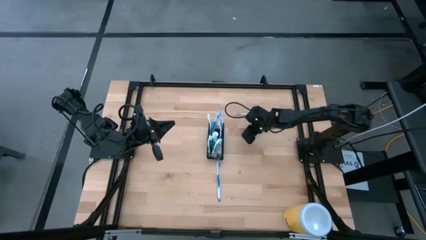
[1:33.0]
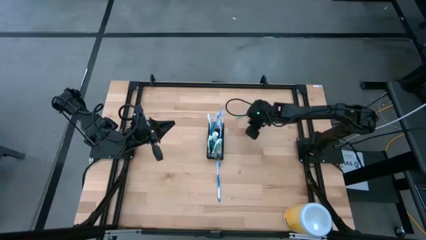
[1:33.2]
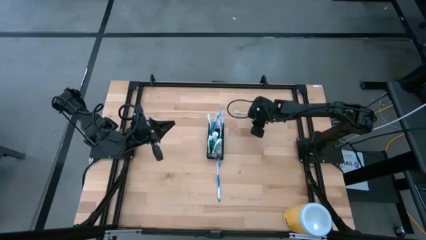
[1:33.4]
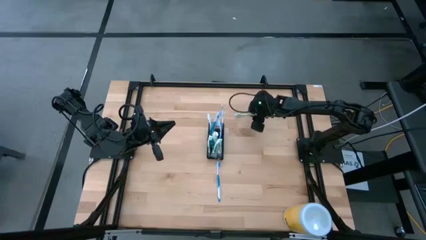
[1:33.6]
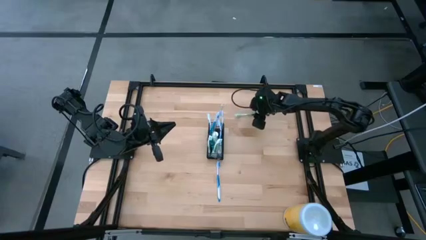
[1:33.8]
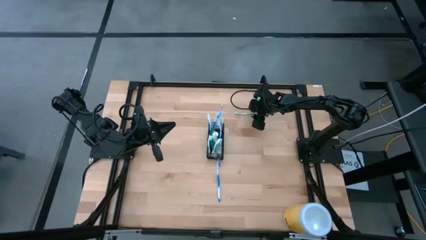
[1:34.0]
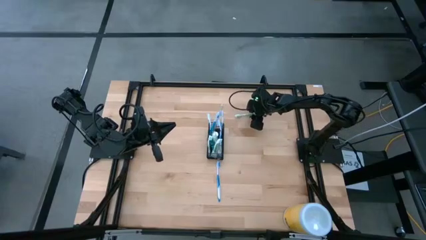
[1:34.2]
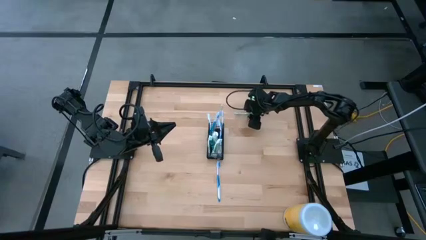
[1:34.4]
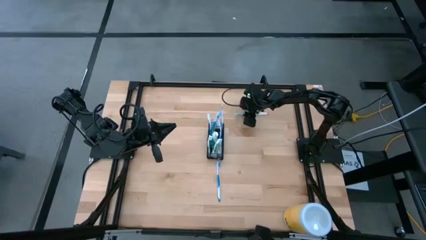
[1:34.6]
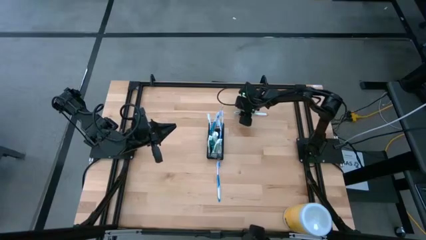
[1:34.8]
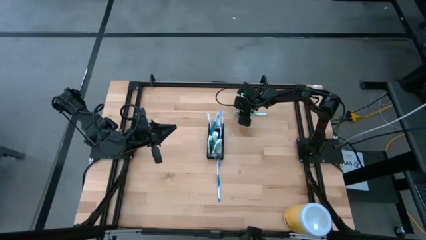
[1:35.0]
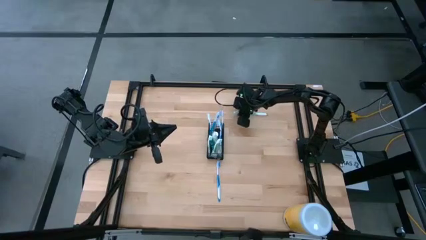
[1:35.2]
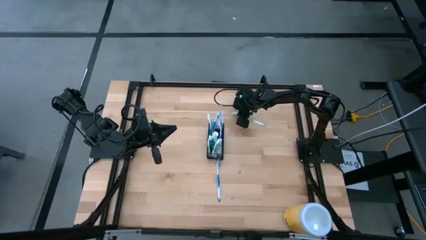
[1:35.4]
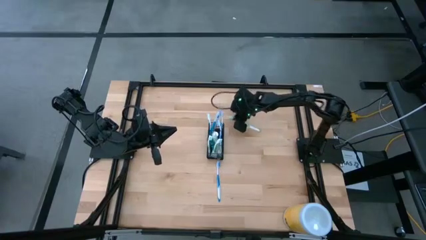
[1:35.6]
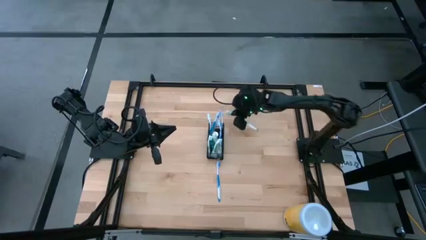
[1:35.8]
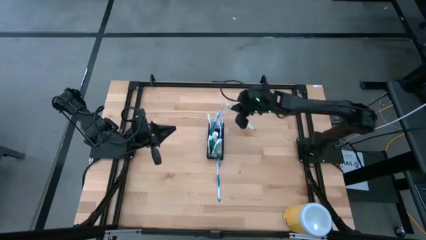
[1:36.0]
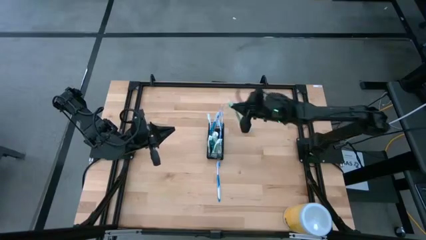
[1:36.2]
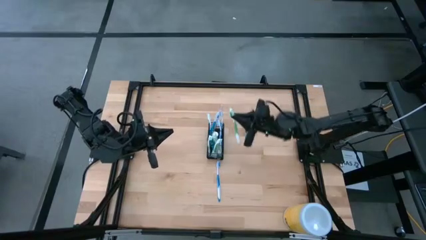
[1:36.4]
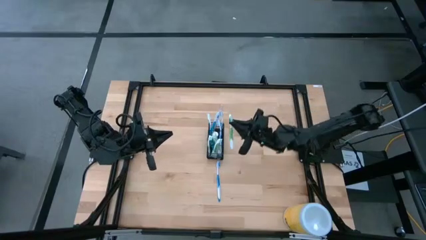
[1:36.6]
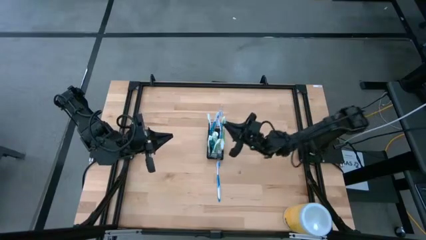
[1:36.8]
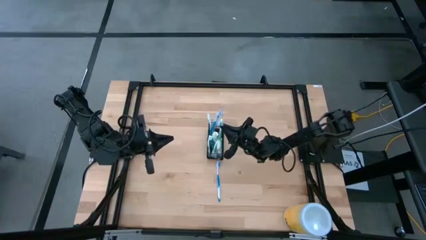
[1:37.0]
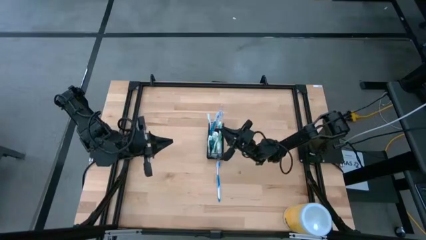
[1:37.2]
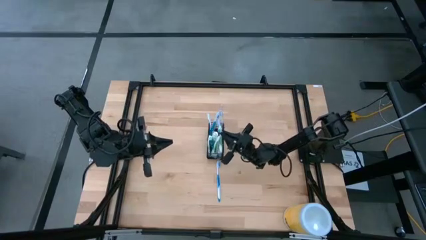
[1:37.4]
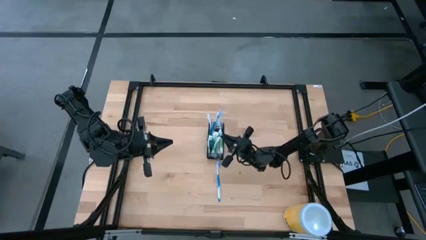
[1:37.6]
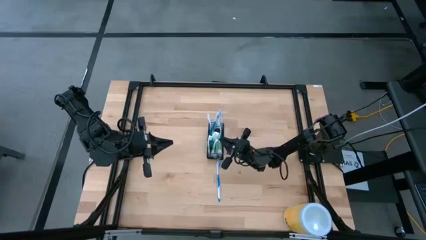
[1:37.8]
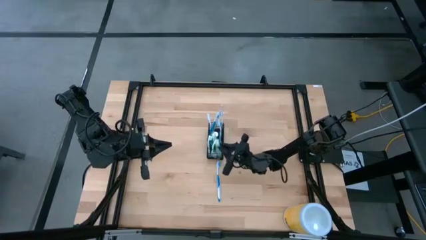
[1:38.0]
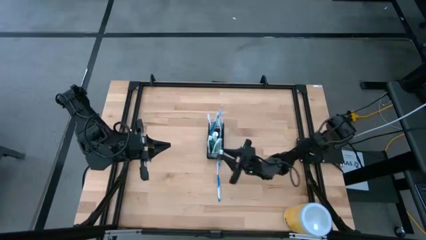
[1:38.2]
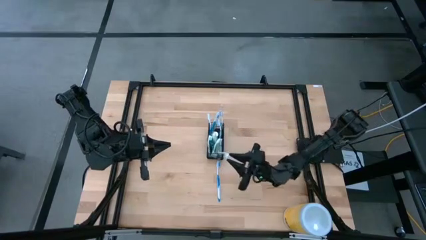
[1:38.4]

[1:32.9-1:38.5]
Task: Pick & Place toothbrushing station
Put the green toothbrush into the black organizer

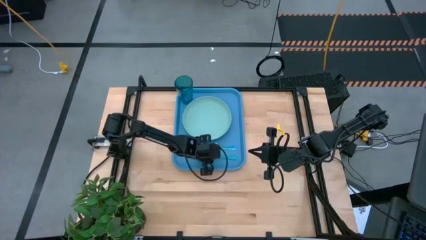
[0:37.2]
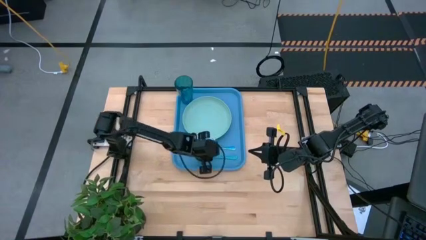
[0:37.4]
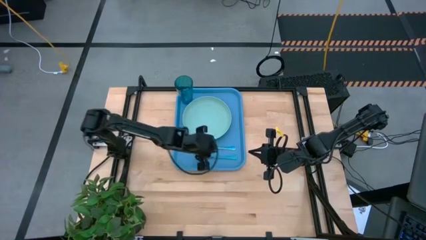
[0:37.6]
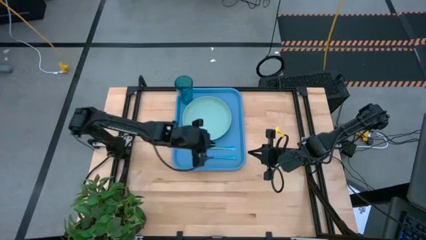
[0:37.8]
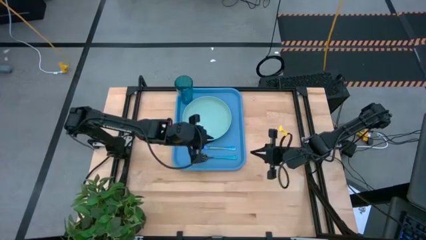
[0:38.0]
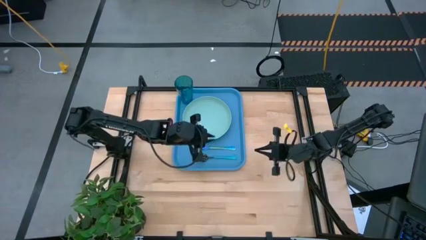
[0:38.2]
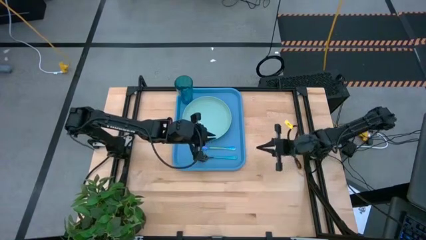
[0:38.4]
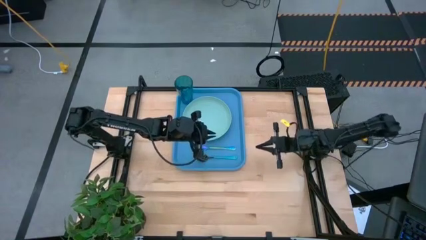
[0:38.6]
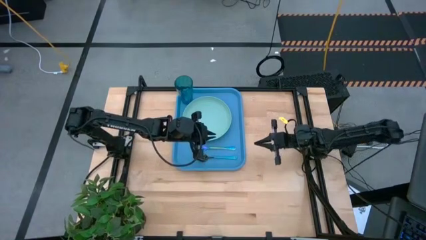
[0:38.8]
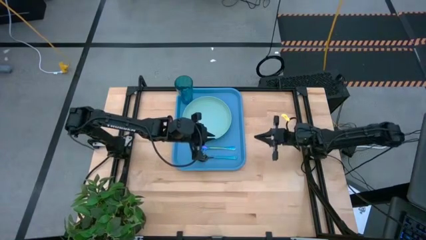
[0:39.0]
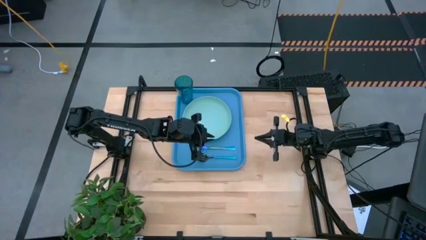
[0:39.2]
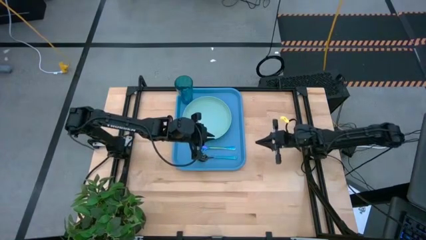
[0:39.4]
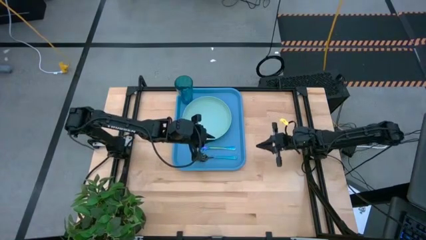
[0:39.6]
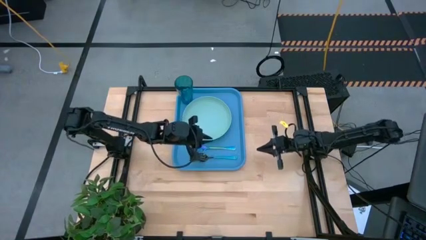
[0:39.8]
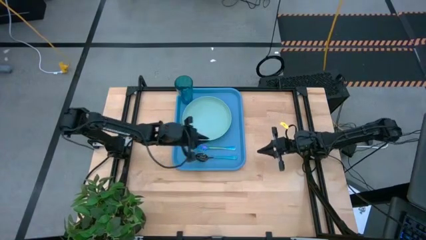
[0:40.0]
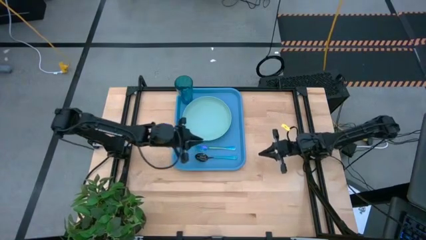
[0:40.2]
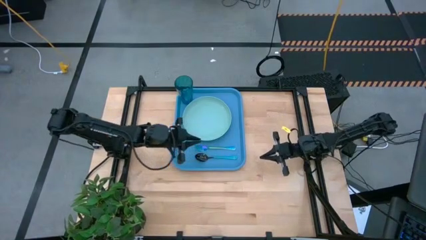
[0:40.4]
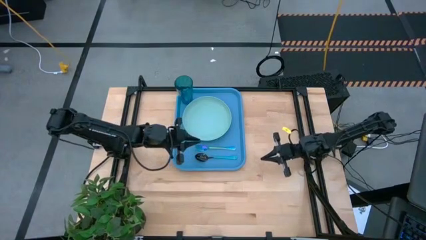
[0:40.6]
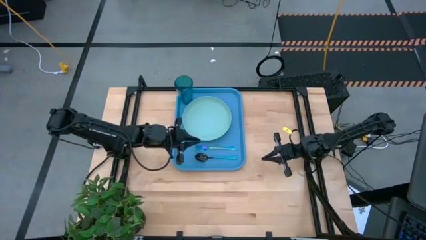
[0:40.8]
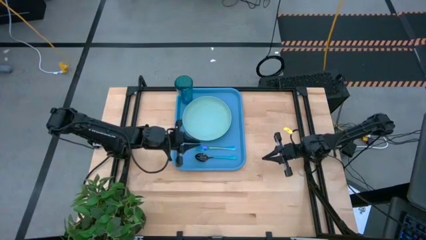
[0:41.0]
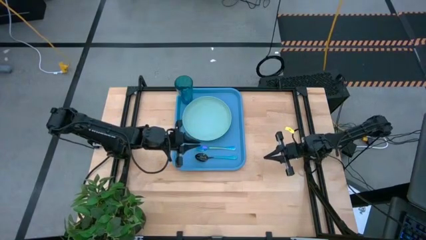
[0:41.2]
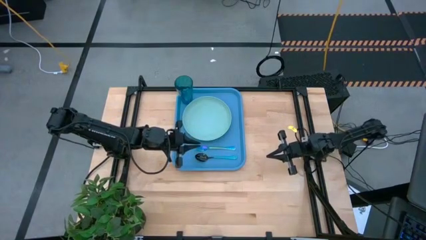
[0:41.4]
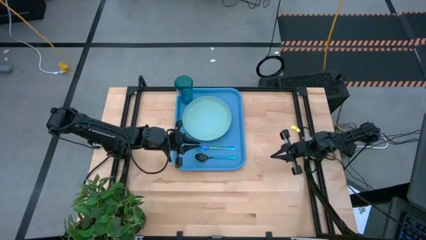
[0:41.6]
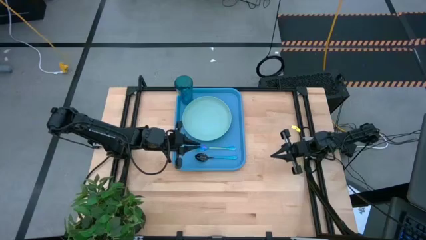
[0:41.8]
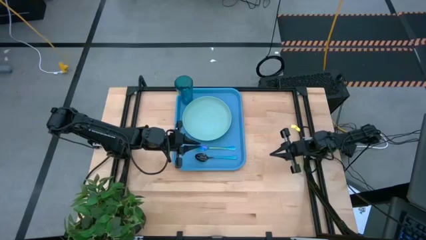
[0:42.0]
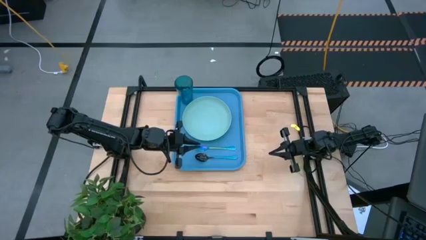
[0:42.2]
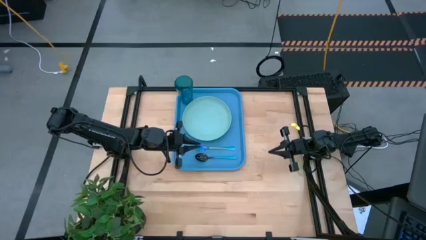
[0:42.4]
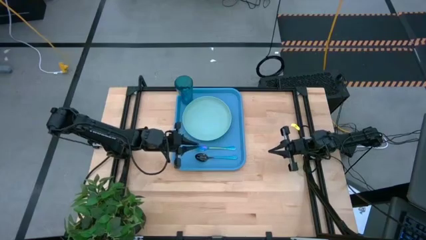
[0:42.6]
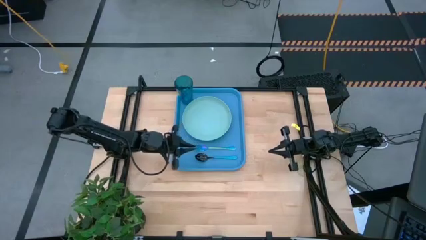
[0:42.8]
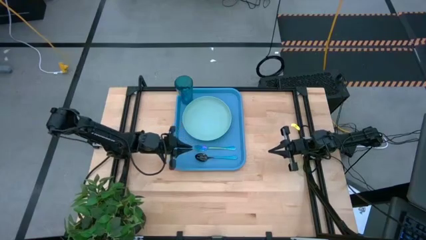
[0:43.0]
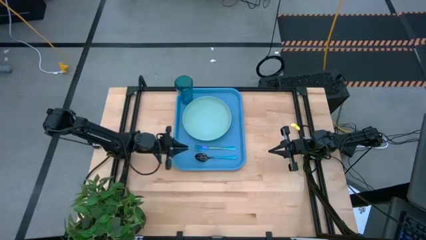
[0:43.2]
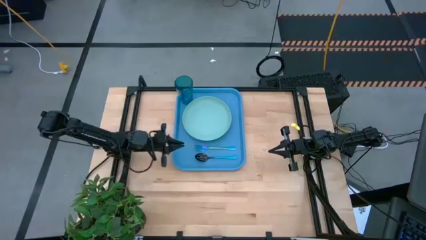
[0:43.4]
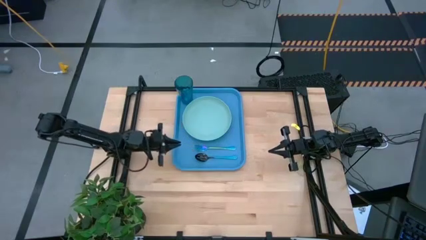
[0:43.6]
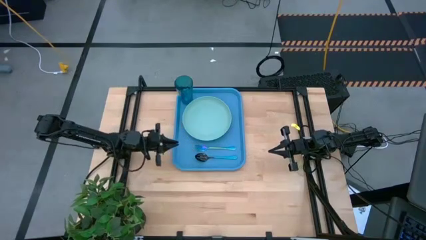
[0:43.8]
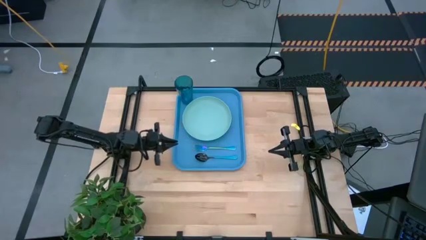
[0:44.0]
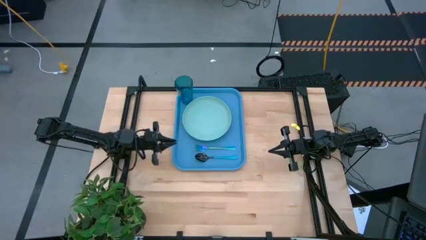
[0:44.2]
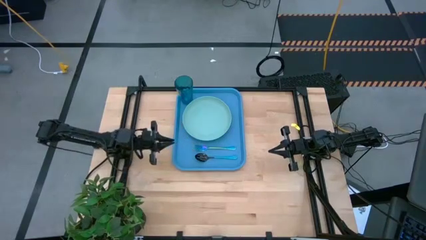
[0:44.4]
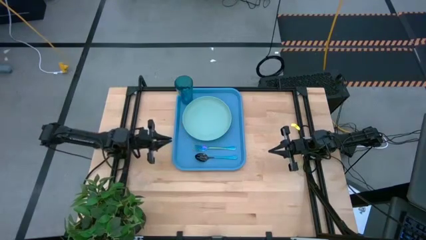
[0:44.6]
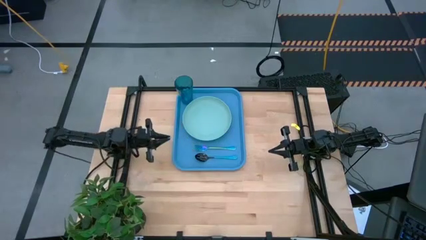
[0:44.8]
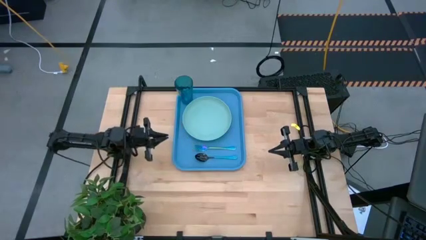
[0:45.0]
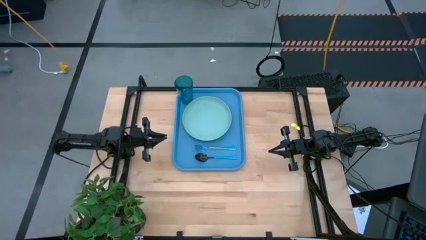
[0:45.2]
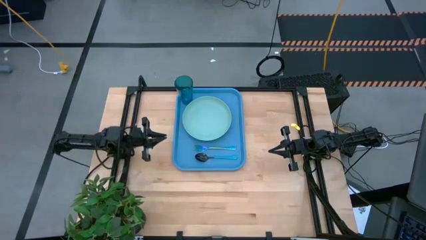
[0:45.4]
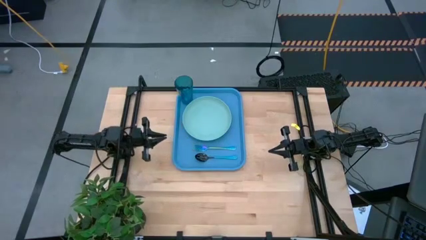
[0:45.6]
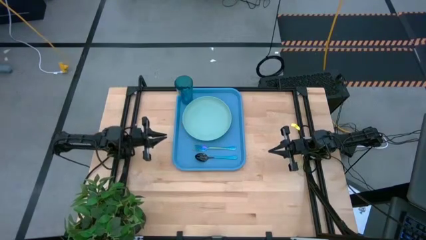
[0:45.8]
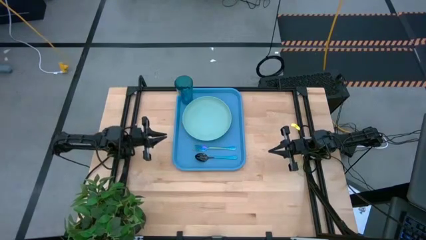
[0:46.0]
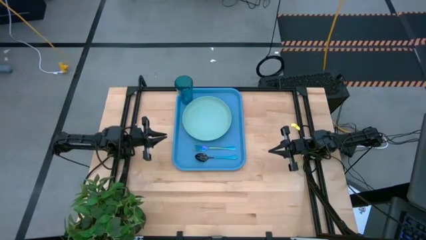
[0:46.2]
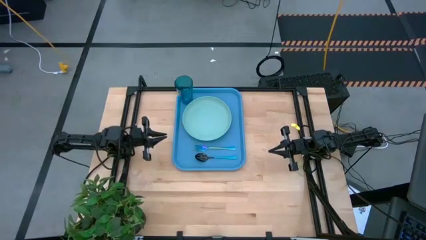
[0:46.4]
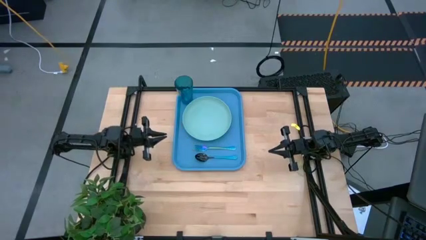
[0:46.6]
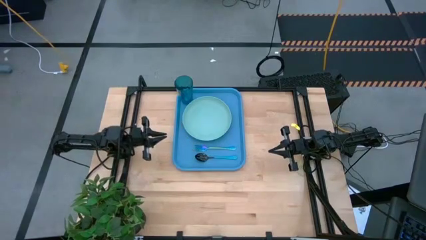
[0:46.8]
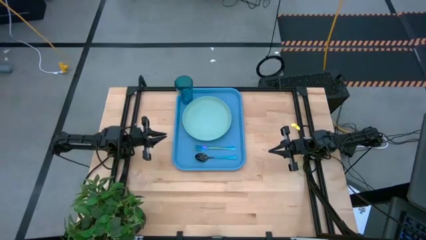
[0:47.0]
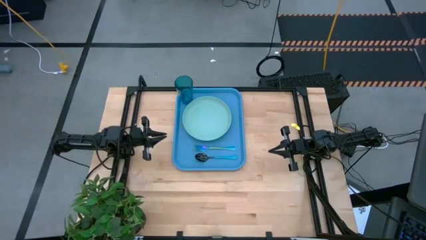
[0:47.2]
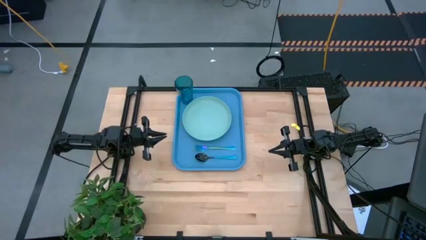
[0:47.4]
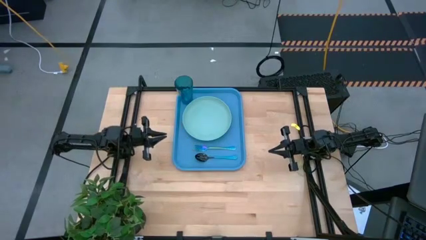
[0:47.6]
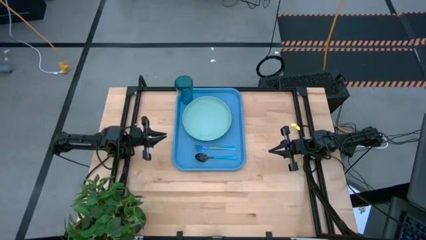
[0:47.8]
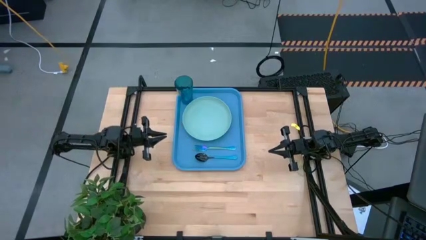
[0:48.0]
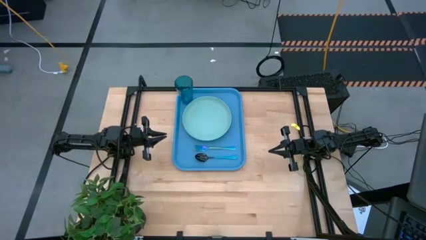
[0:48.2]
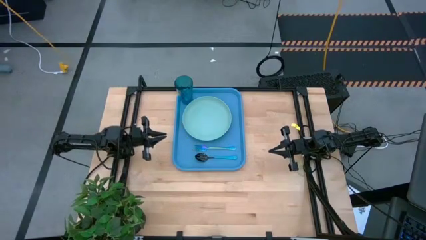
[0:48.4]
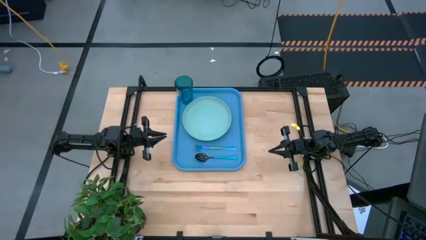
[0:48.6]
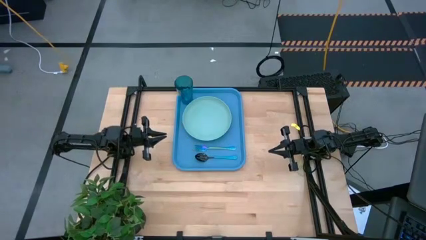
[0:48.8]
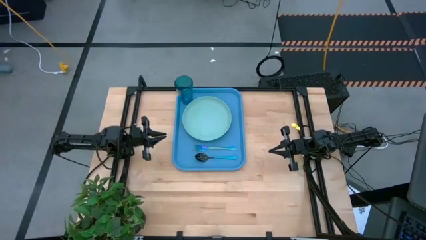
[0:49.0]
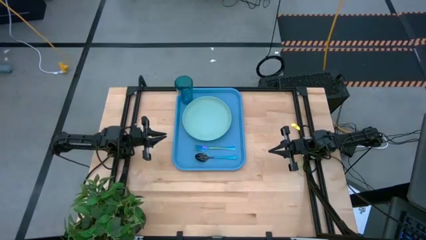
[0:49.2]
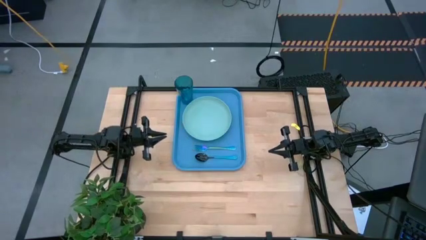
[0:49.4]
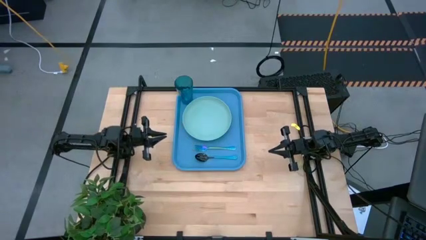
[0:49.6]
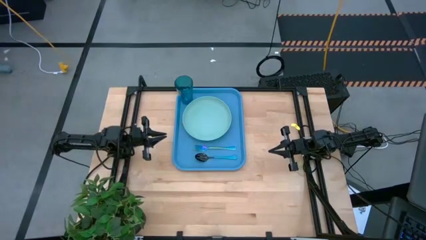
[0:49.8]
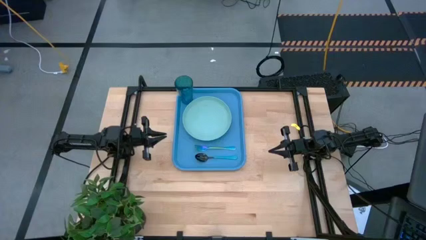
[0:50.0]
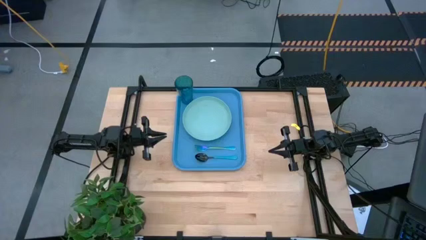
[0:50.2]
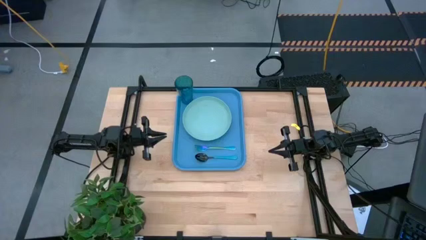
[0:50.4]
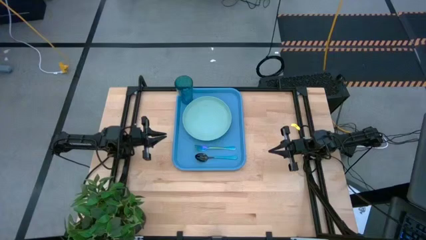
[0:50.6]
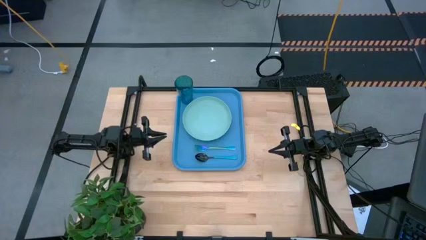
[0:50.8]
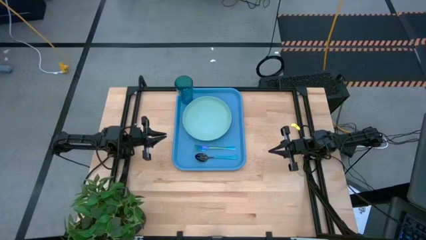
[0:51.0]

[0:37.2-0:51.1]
Task: Pick and place plate/cup/fork/spoon on tray
Return to Home Position
